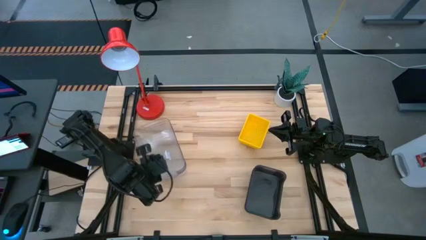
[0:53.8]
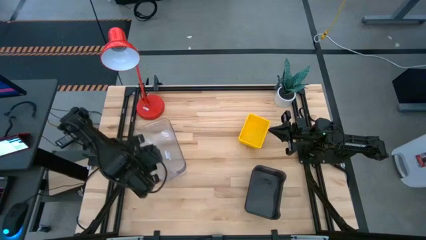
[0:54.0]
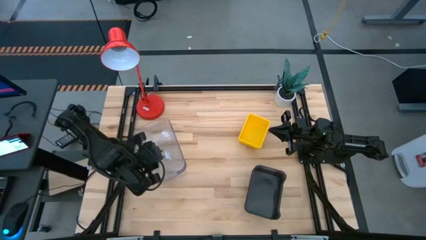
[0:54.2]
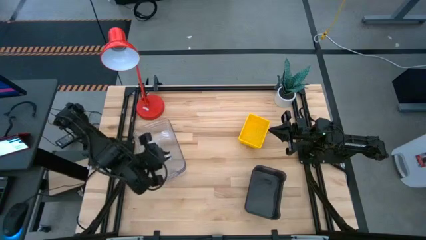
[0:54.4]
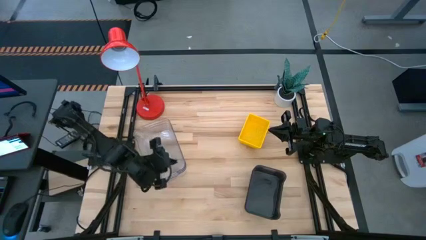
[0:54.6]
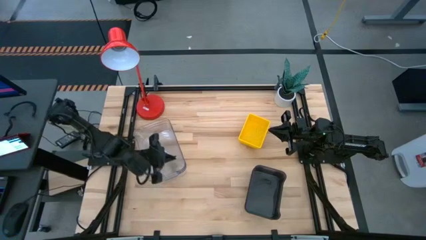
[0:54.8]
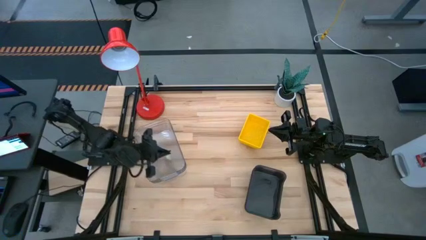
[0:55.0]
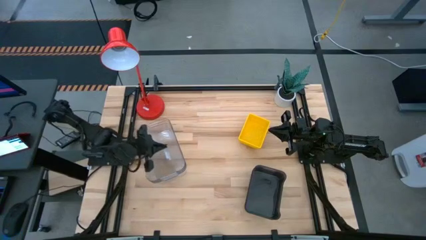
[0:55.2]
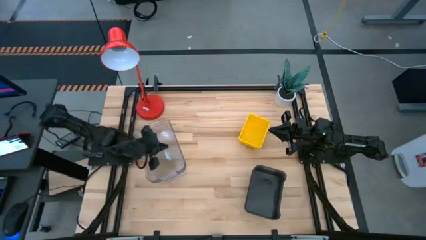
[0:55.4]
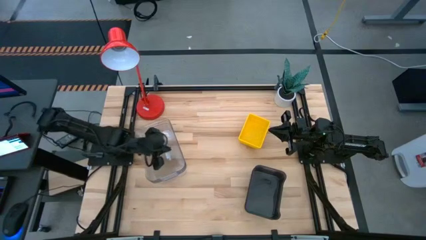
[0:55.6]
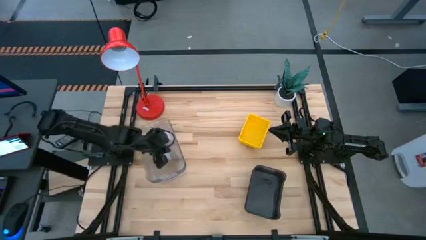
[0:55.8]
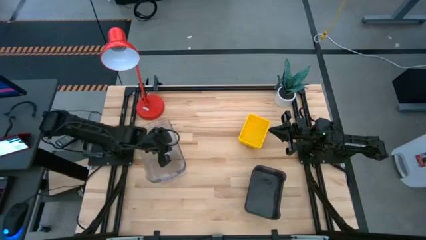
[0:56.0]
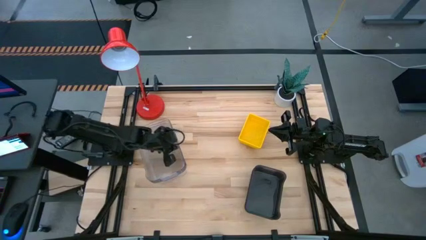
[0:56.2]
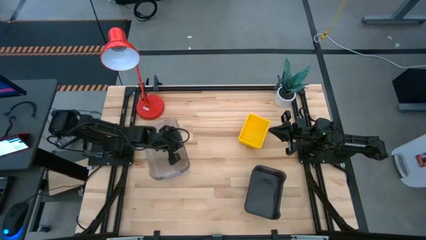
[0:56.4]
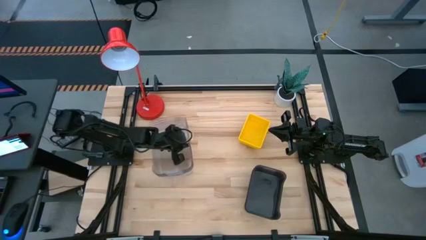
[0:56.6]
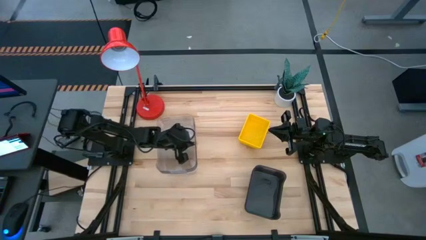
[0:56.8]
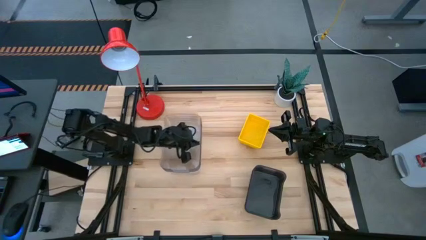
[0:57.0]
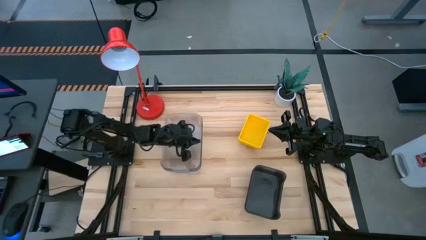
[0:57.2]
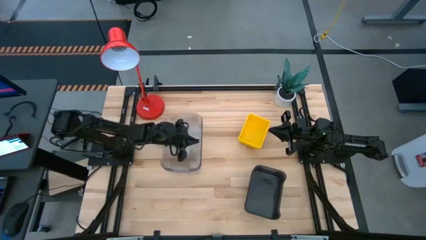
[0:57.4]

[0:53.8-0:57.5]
Adjust the stacked transparent bins

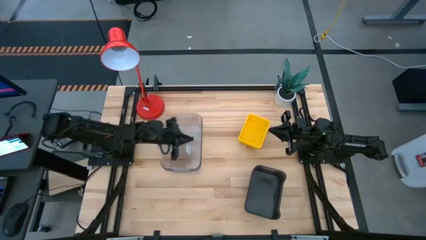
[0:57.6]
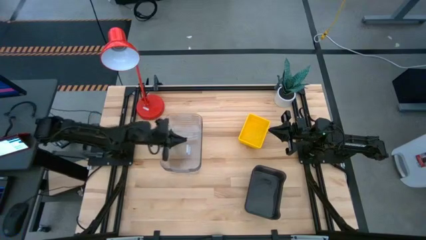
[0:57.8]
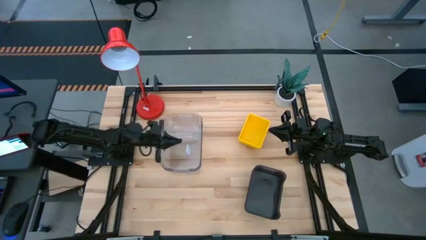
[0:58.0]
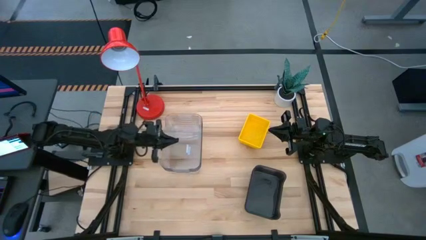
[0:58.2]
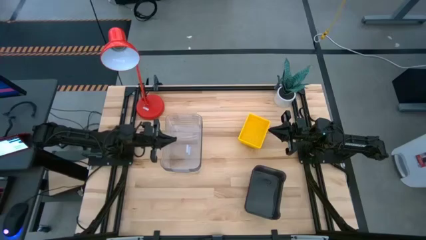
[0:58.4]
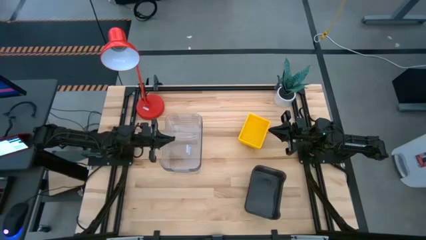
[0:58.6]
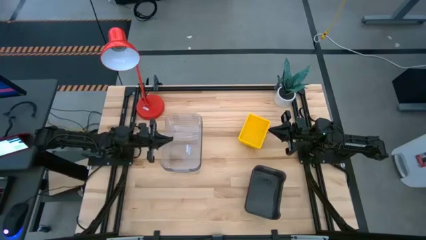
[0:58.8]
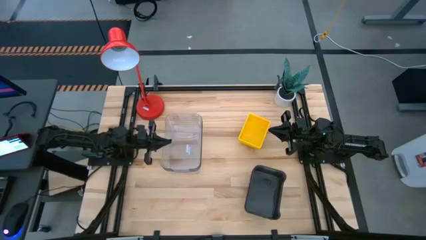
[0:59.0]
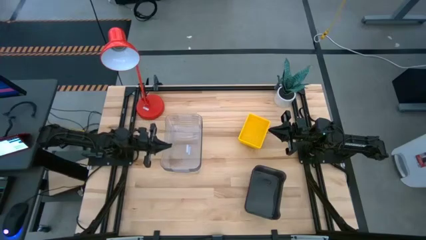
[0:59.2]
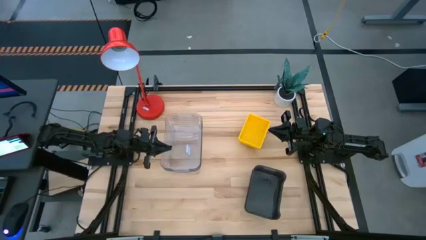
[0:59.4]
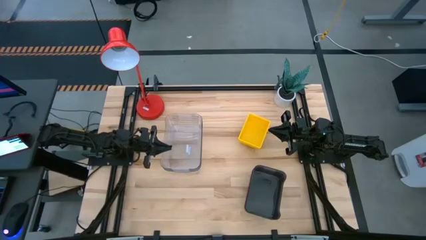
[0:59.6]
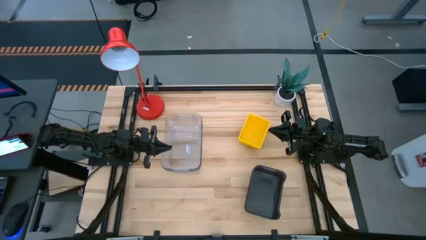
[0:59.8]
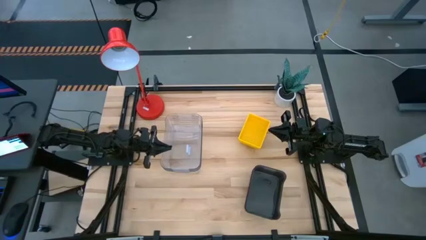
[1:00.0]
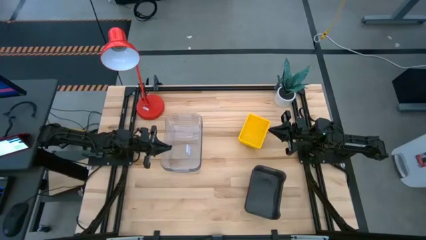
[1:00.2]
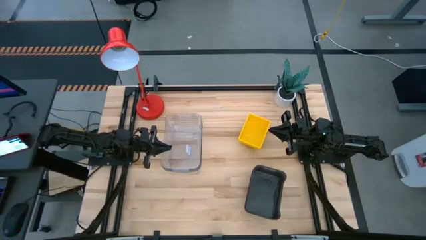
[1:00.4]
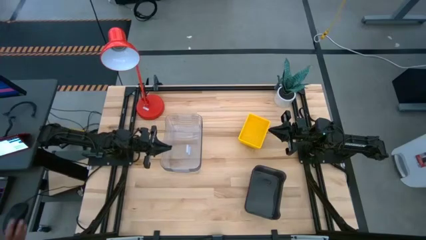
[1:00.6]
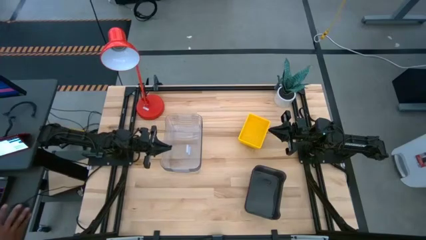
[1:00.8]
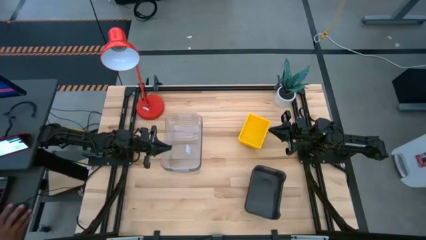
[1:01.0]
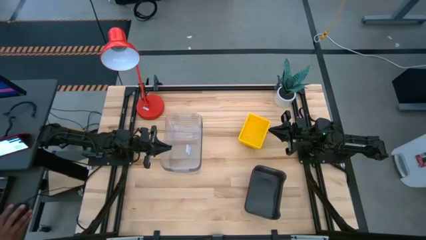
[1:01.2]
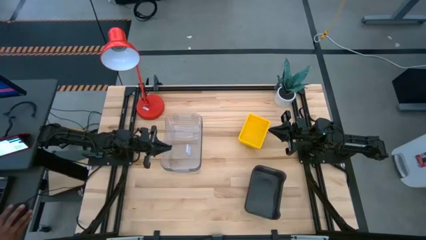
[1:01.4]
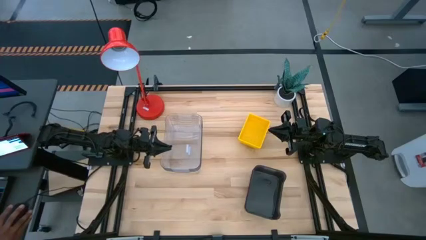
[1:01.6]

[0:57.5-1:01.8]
Return to Home Position

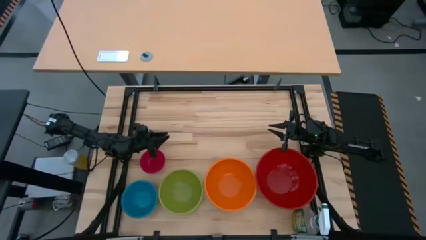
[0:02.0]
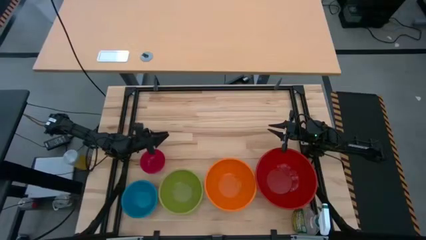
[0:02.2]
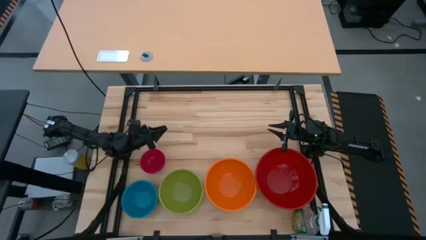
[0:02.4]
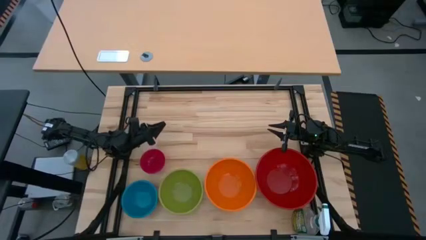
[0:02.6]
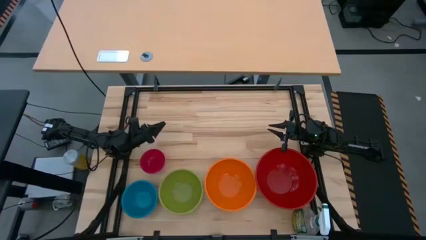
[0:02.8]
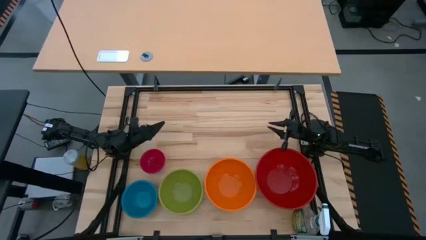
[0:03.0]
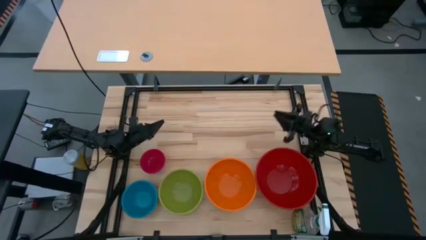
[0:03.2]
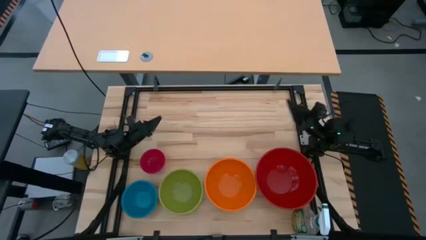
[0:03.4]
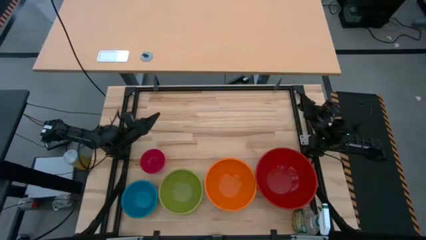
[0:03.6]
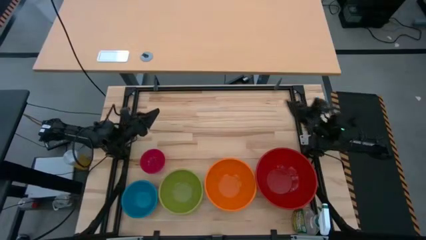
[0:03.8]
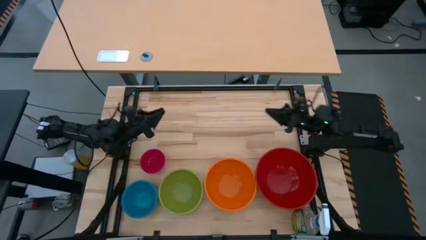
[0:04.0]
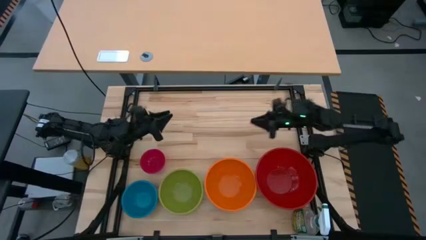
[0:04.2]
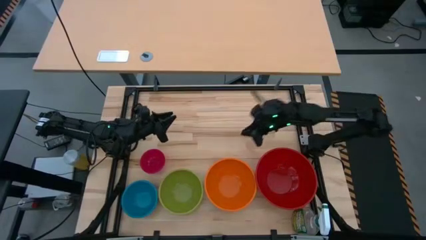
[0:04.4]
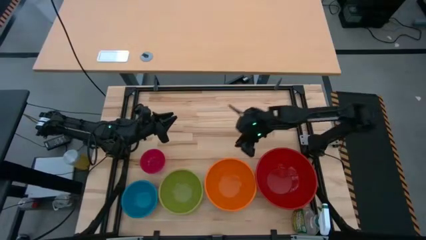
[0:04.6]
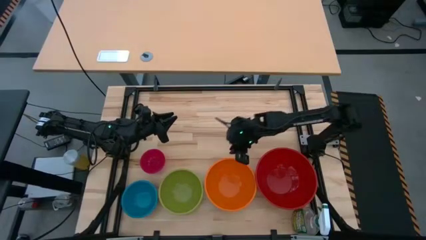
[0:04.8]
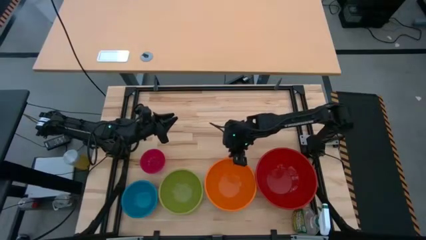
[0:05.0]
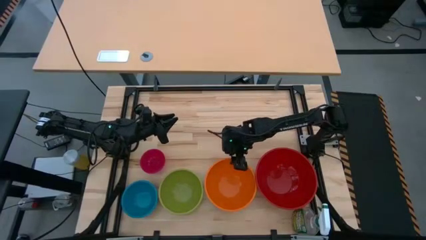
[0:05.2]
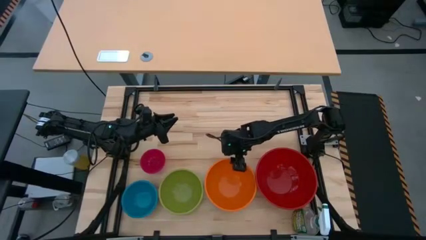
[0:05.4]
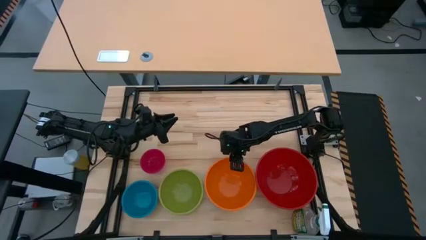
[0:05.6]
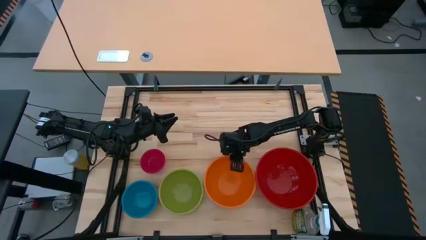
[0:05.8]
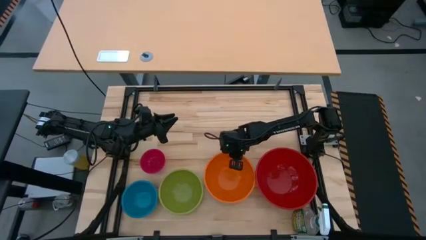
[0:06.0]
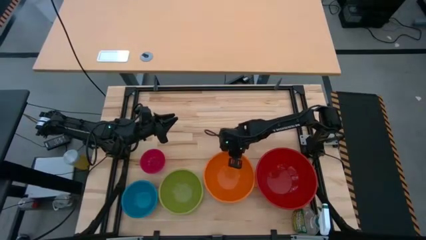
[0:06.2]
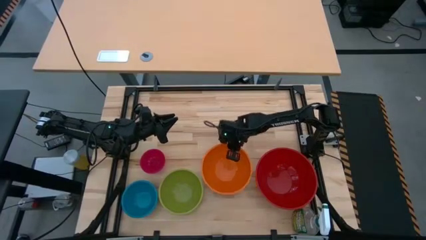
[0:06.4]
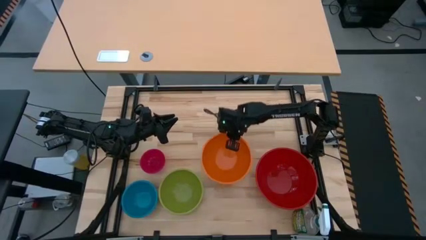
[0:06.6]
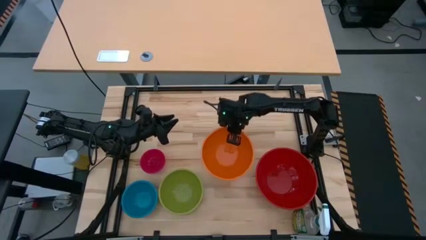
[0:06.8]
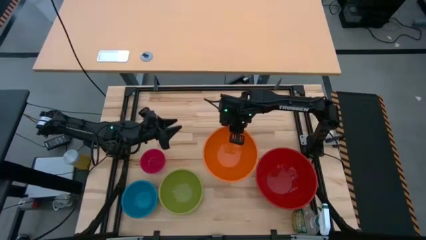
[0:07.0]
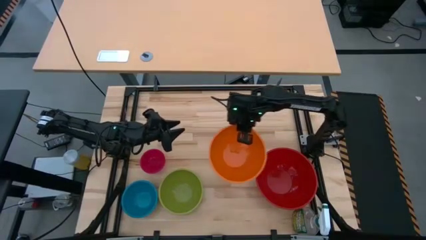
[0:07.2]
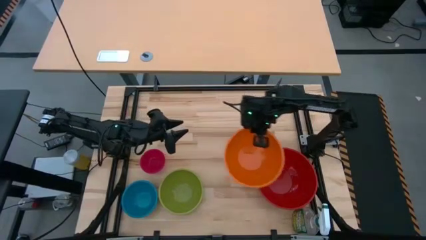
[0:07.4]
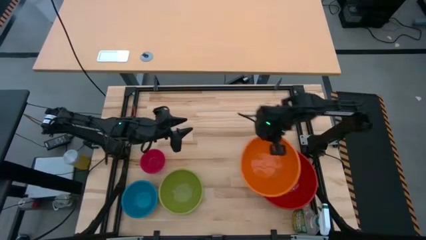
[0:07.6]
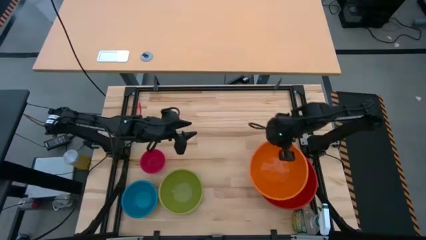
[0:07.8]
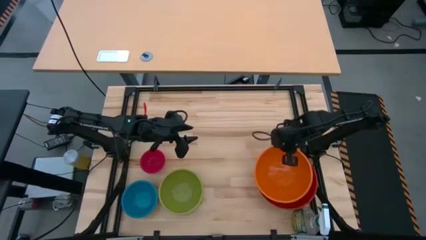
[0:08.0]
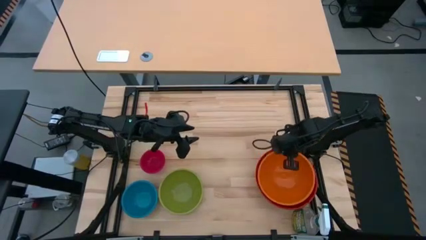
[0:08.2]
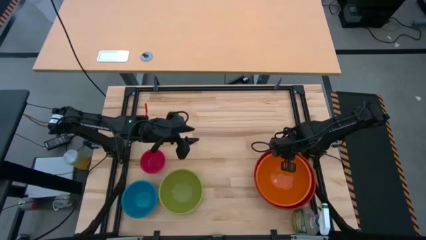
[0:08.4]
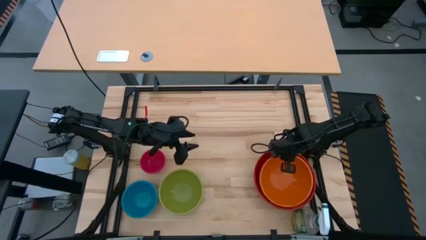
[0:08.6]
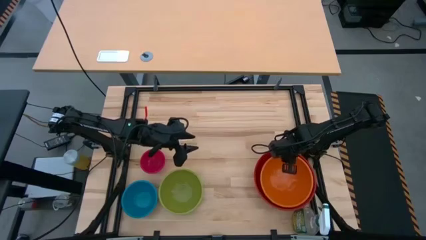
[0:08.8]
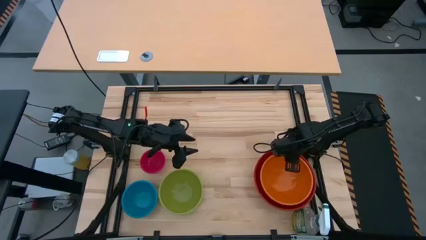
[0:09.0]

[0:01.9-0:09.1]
Stack the orange bowl on top of the red bowl
